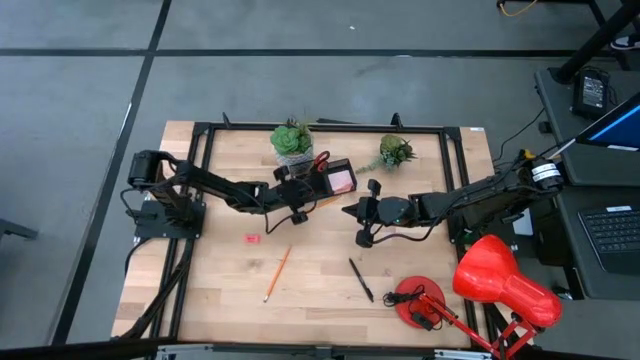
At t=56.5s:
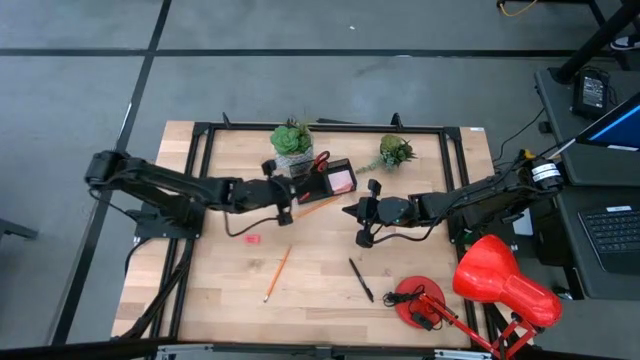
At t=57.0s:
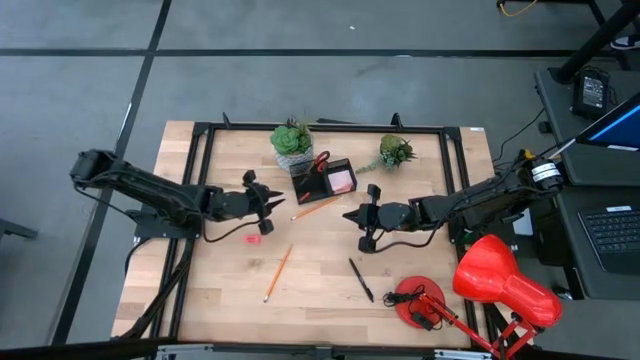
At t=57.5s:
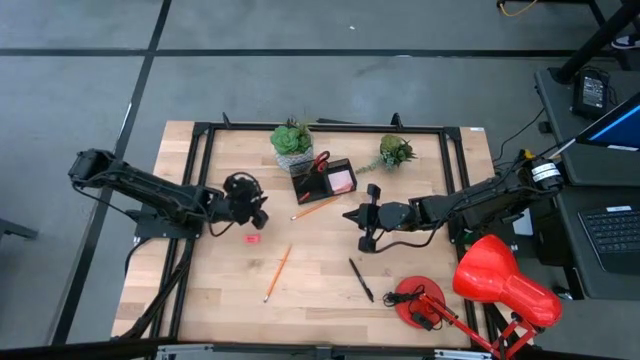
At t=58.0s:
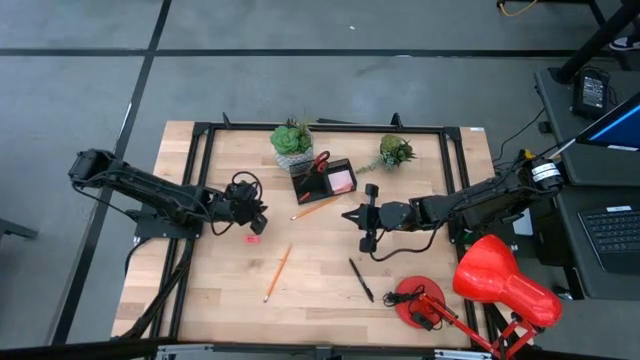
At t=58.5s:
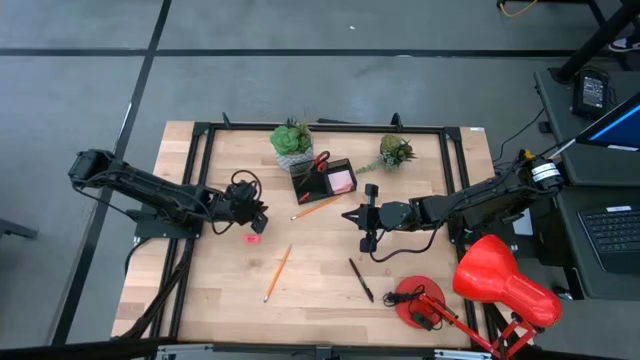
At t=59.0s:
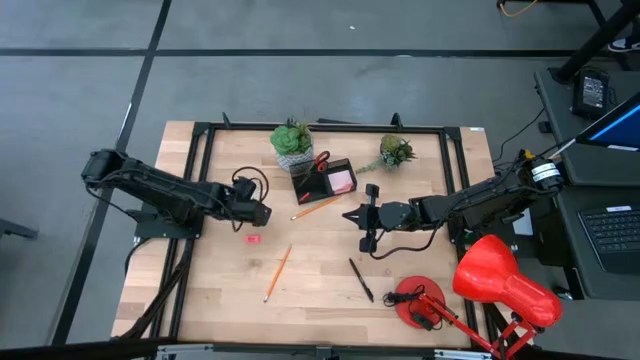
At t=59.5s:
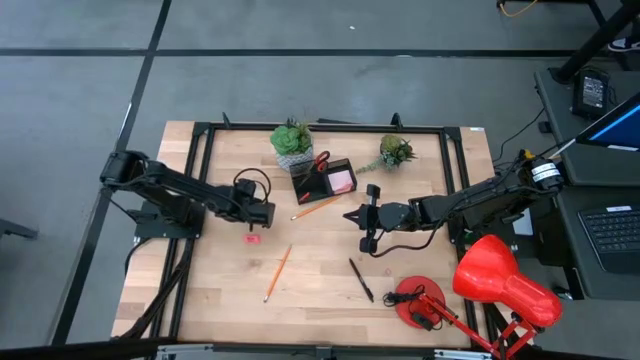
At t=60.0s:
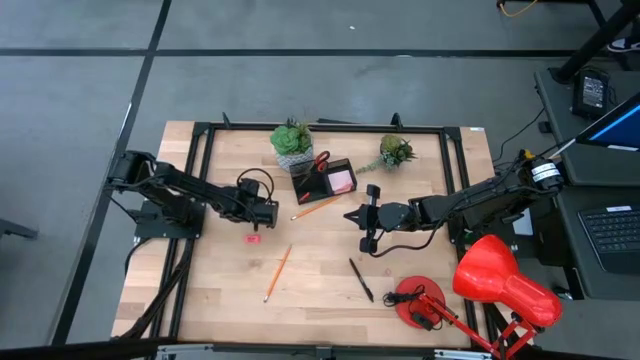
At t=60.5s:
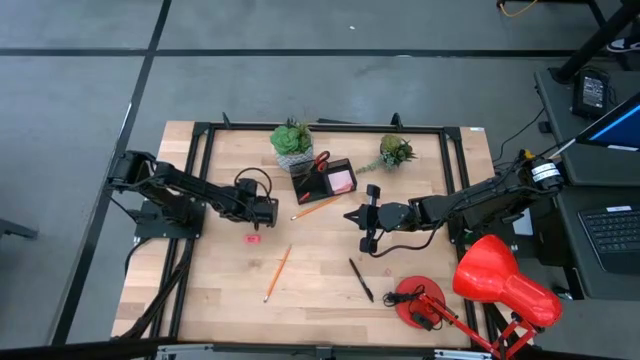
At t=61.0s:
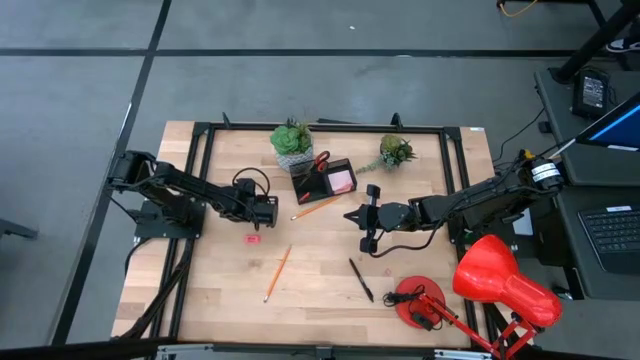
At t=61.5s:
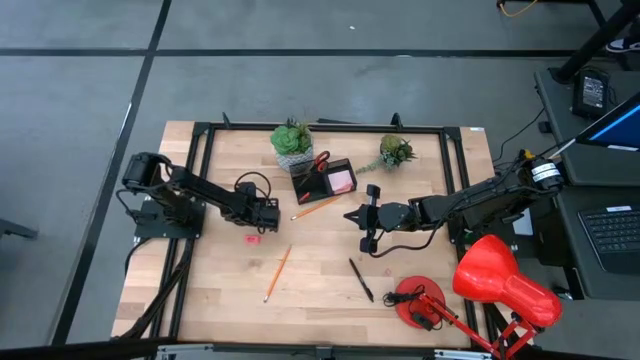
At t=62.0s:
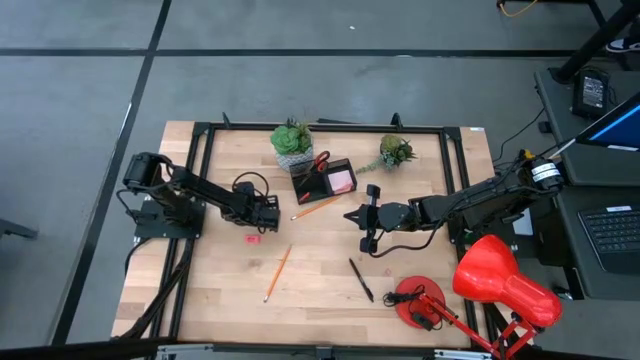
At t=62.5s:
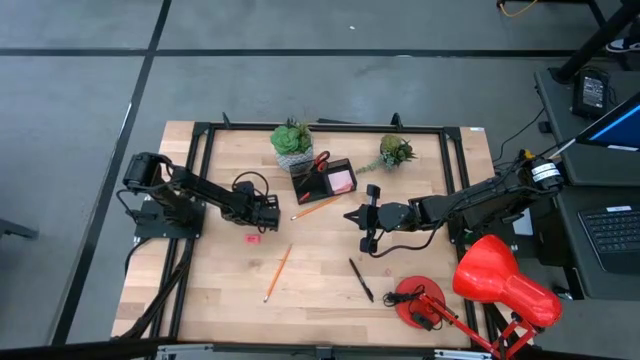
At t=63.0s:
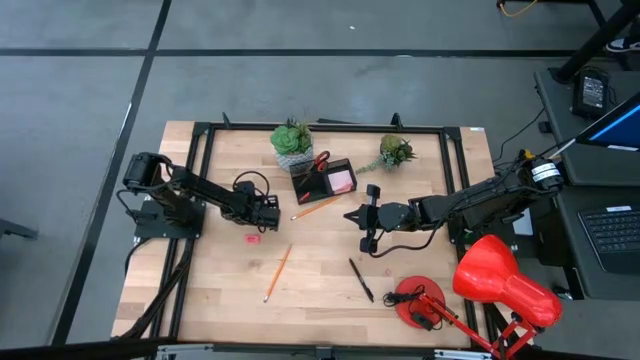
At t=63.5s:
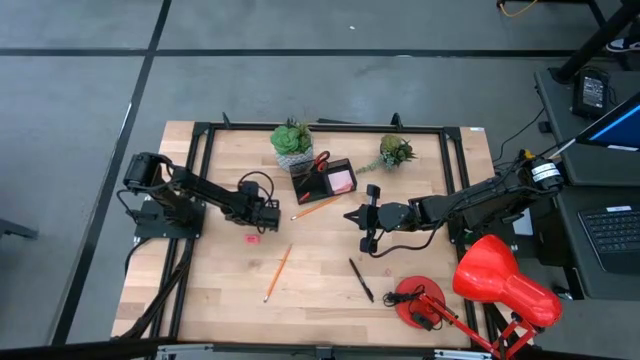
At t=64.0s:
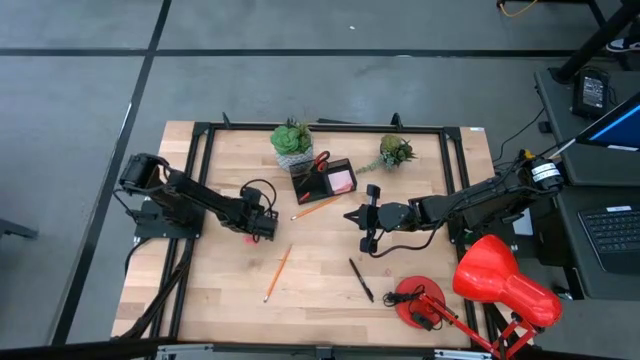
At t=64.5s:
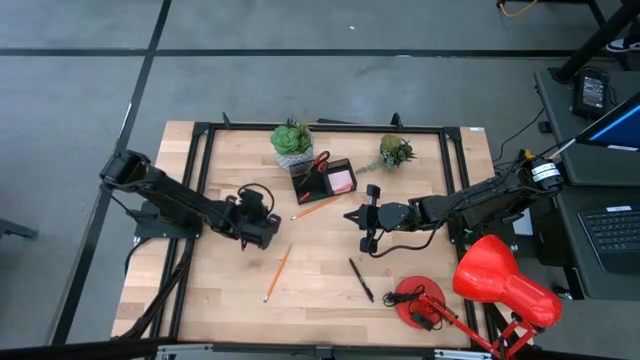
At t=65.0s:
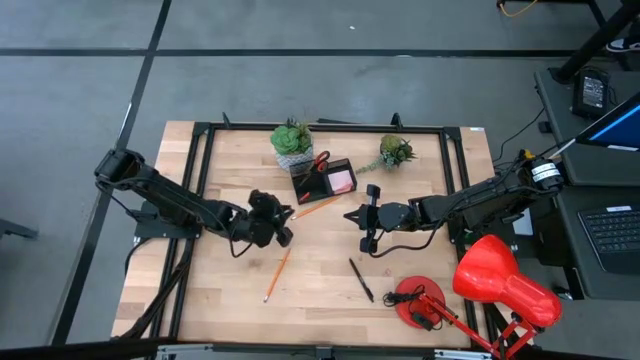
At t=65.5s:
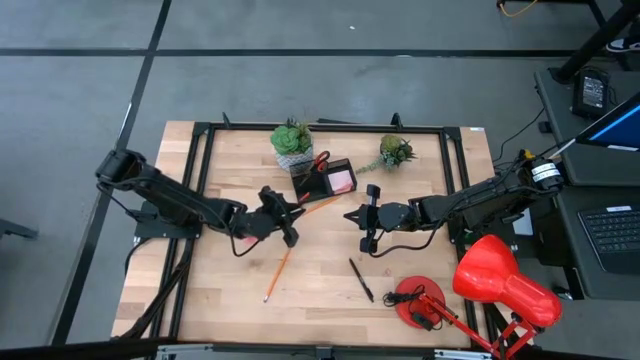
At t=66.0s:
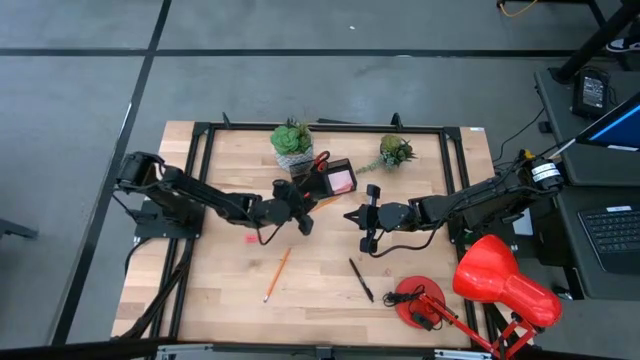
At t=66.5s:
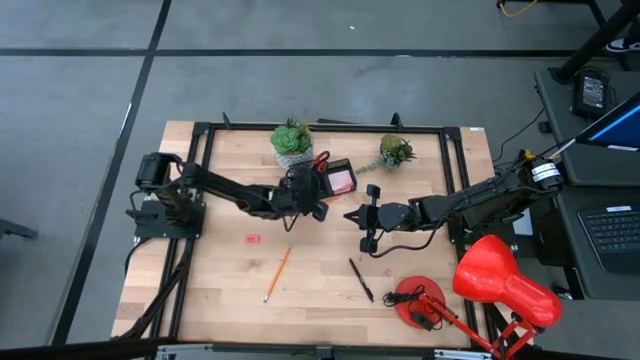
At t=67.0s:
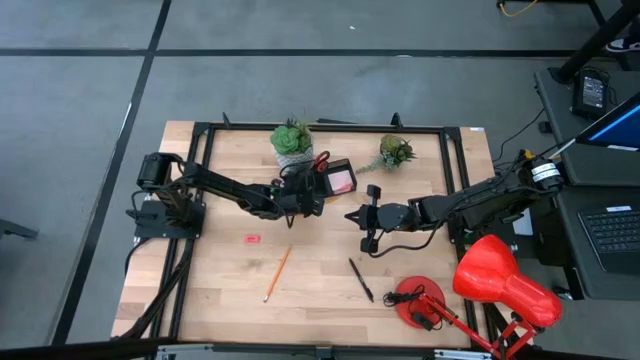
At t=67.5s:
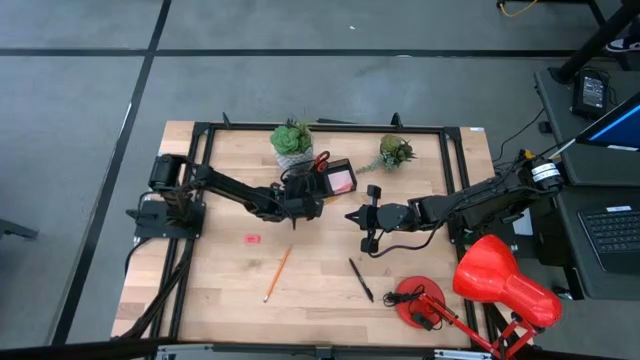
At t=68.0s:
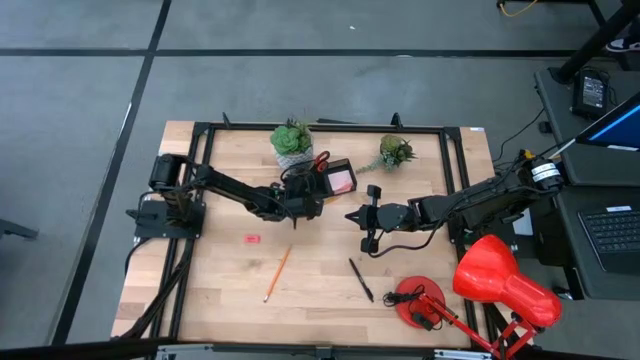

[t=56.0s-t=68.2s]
Task: Pick and place office supplies into organizer
Put the blue binder clip into the black desk organizer

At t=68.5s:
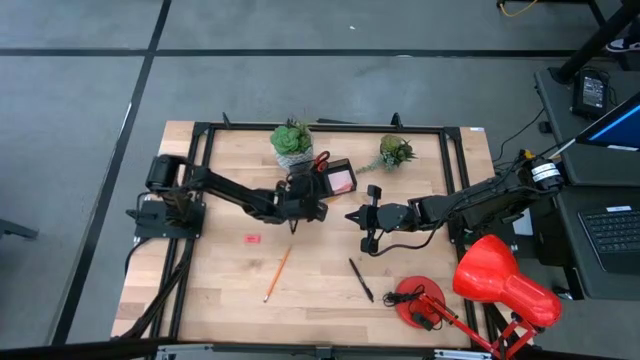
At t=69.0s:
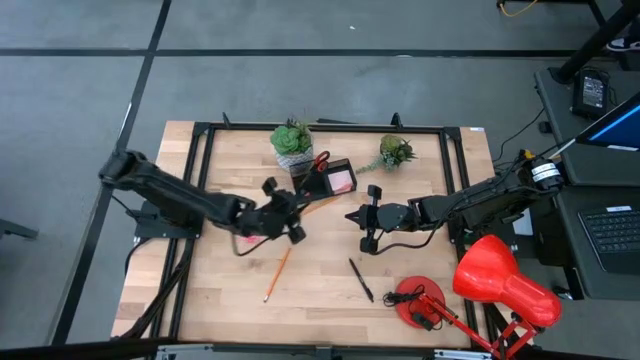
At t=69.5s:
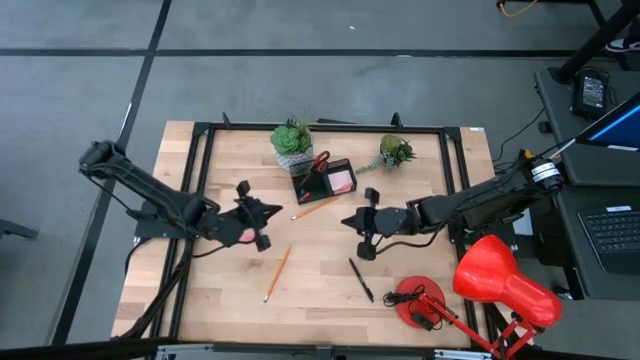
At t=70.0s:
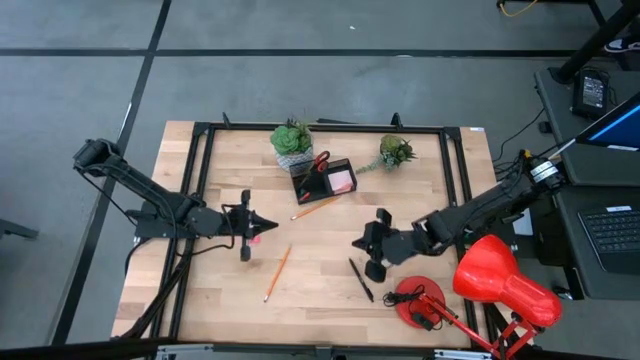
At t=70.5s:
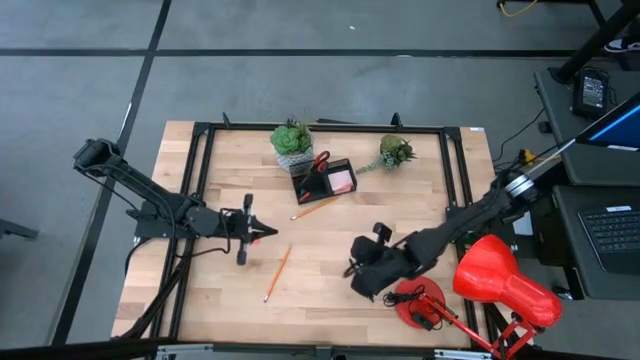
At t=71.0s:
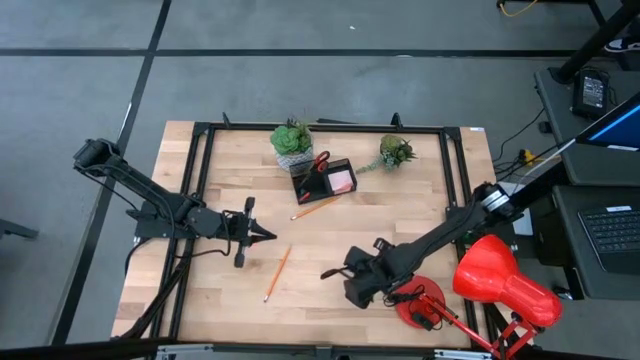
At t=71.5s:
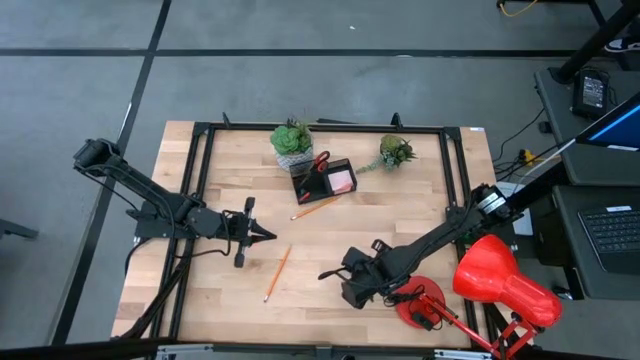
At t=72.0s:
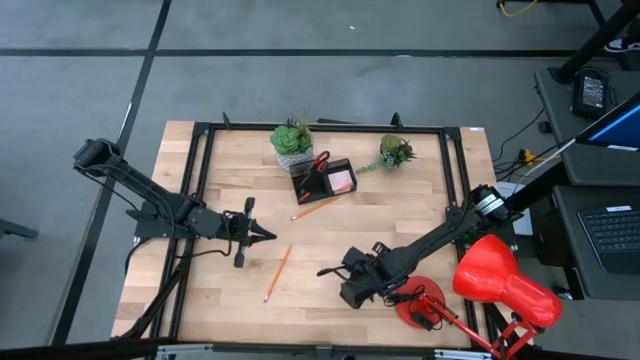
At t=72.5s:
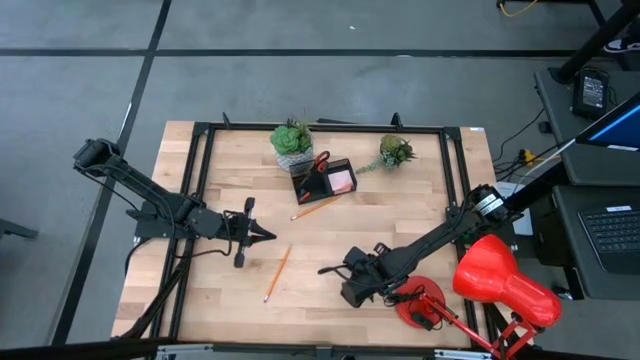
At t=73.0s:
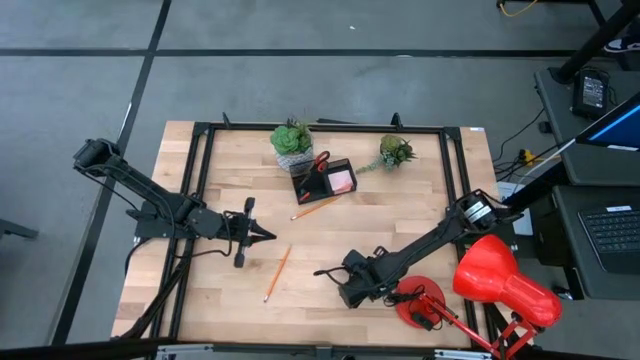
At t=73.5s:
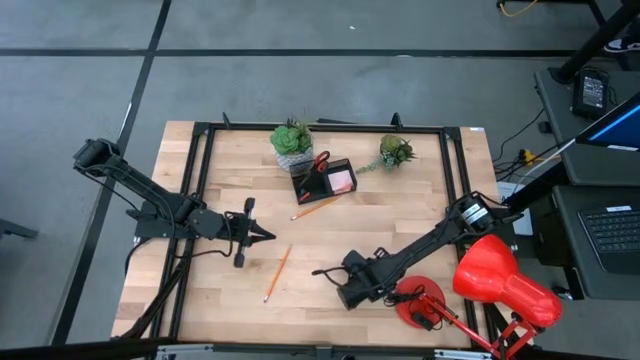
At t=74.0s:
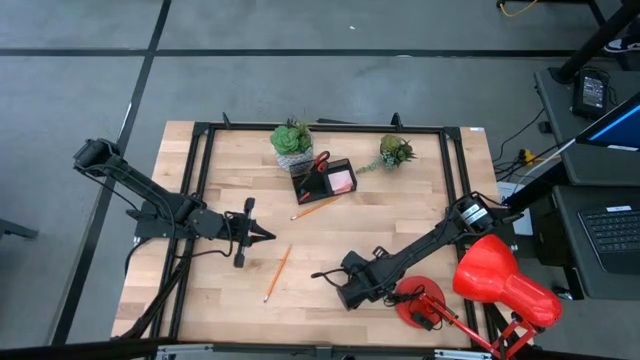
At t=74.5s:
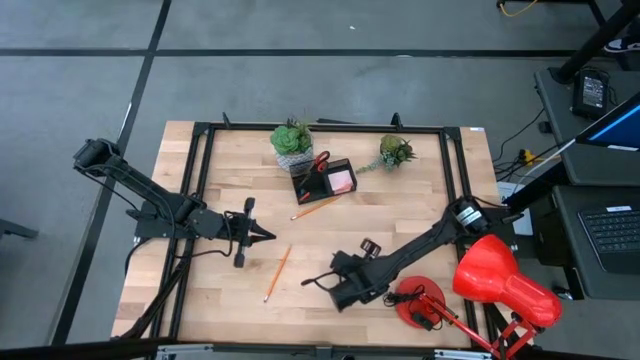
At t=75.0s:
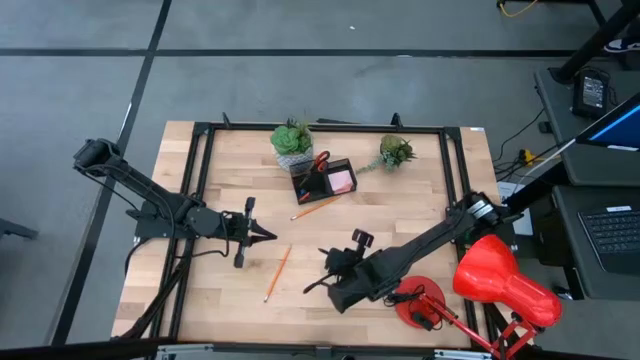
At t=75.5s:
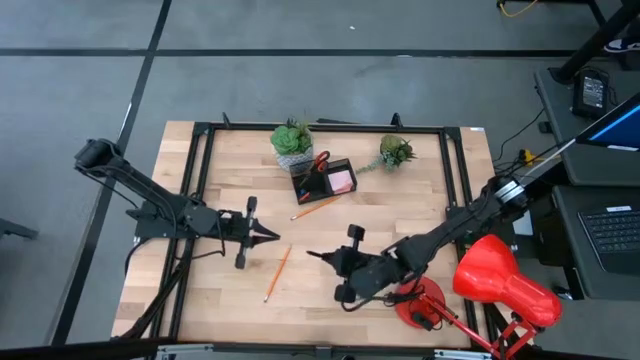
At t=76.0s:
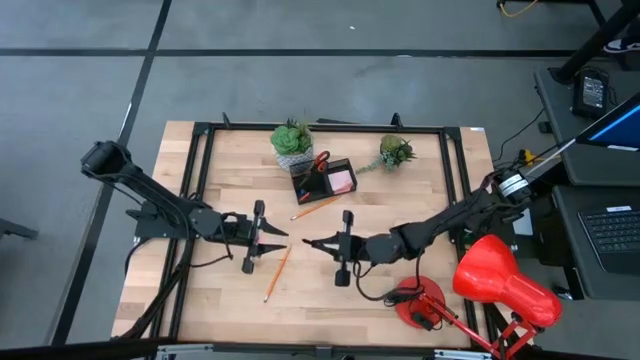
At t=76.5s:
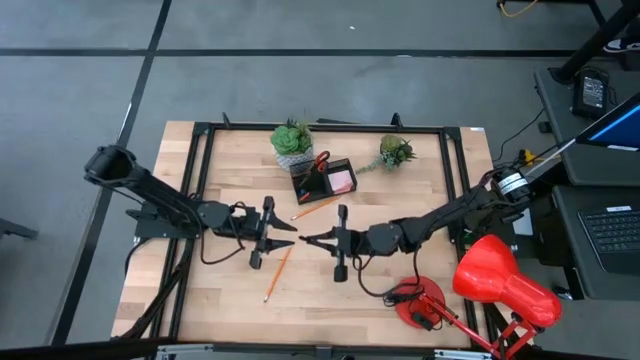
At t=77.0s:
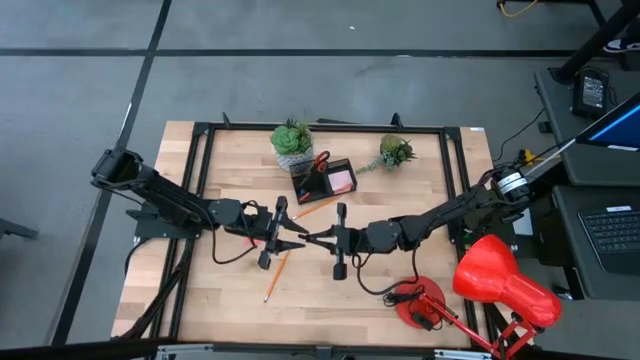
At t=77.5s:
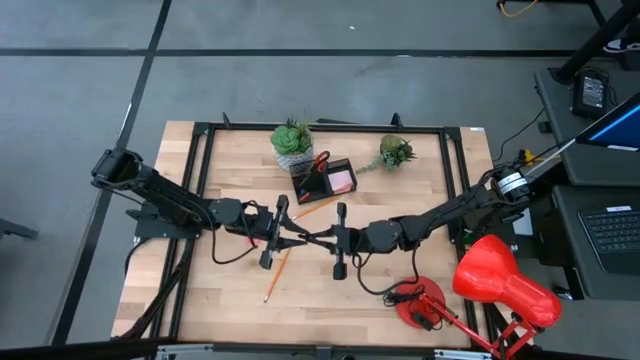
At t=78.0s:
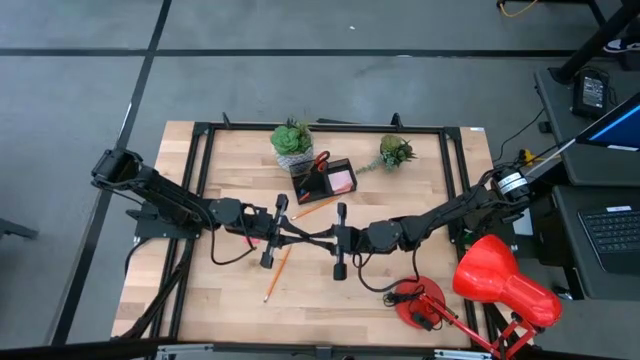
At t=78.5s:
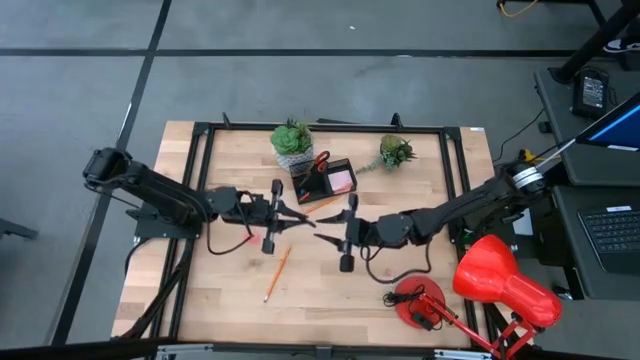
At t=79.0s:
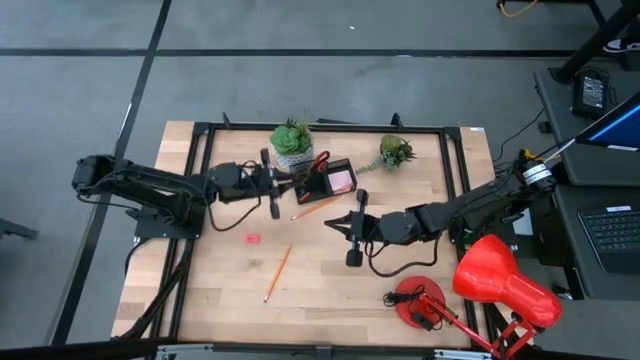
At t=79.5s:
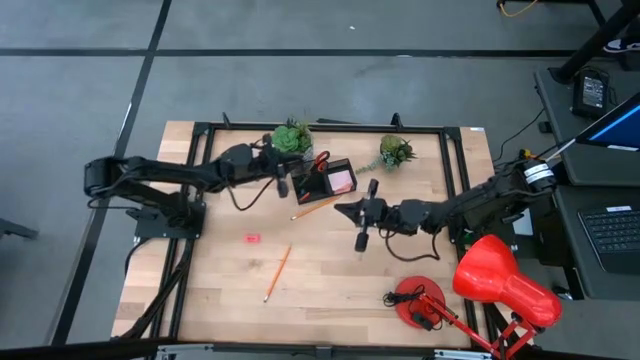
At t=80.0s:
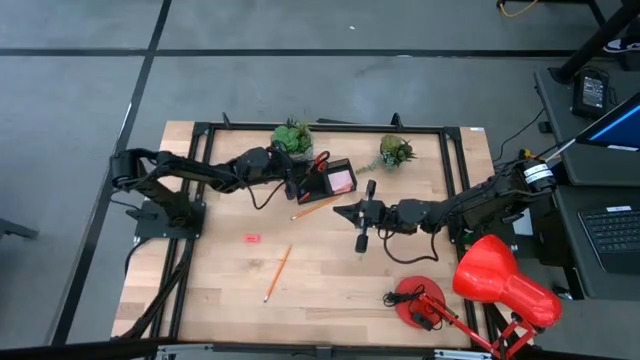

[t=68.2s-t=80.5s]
Put the black pen into the black desk organizer
